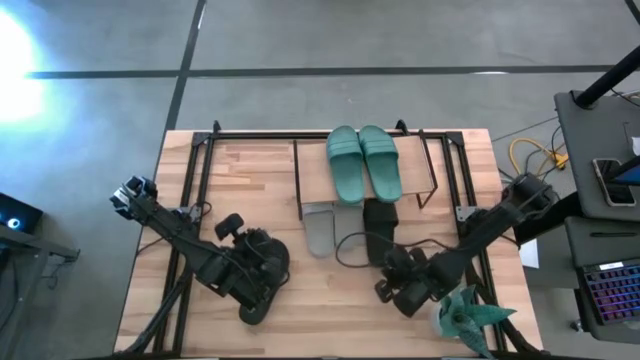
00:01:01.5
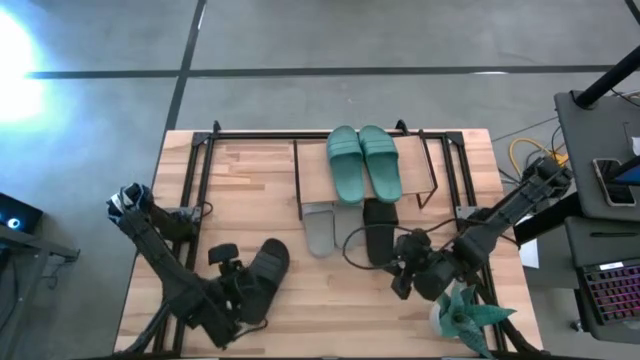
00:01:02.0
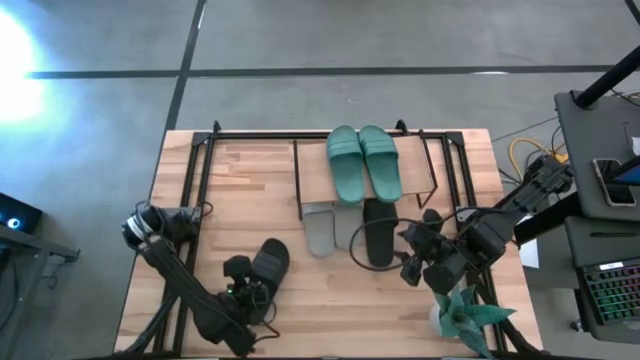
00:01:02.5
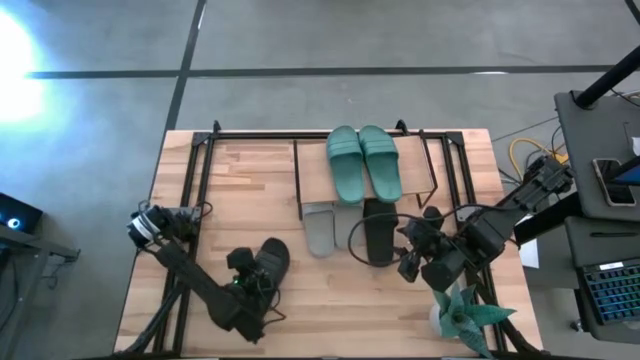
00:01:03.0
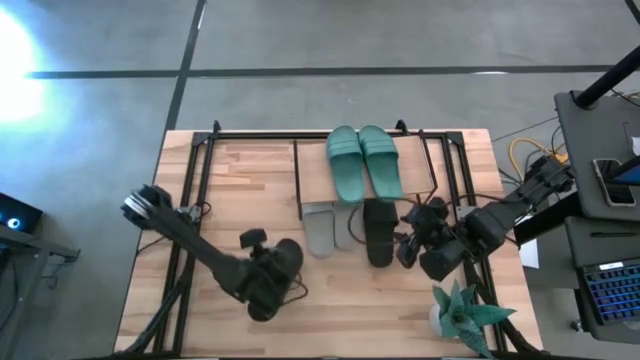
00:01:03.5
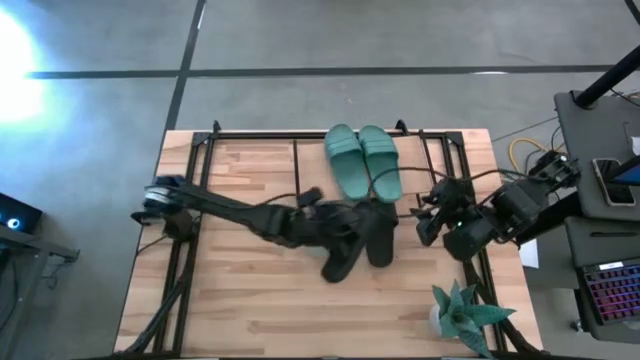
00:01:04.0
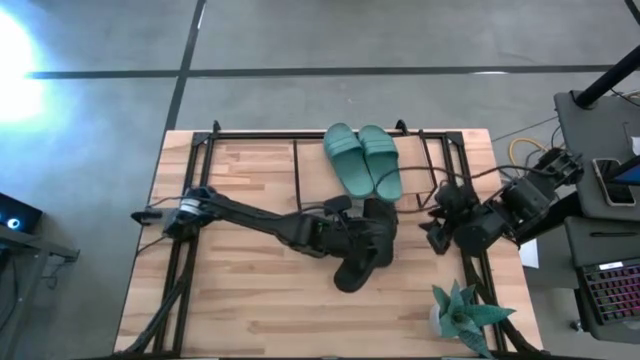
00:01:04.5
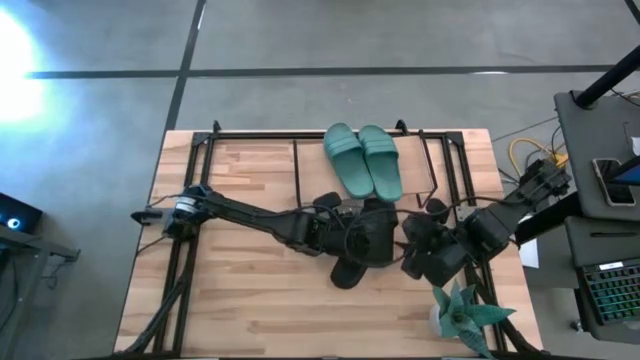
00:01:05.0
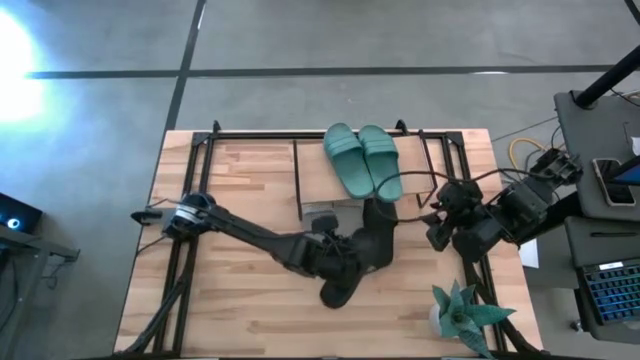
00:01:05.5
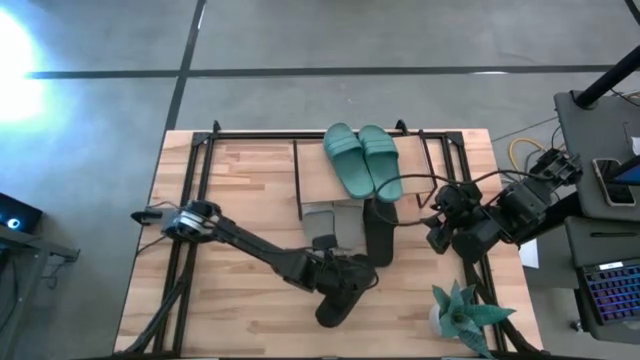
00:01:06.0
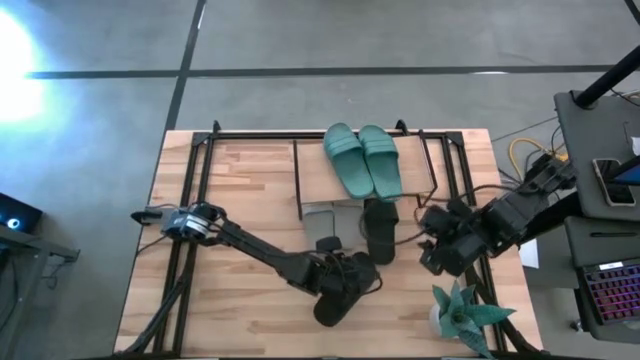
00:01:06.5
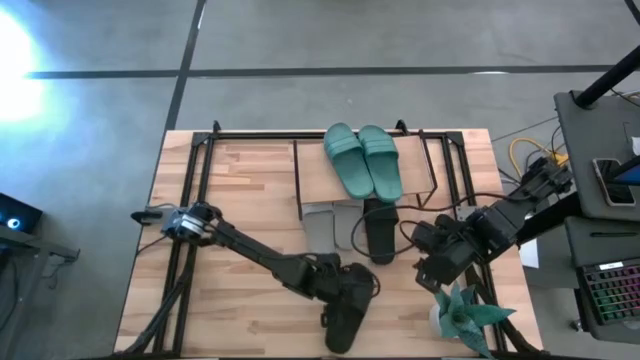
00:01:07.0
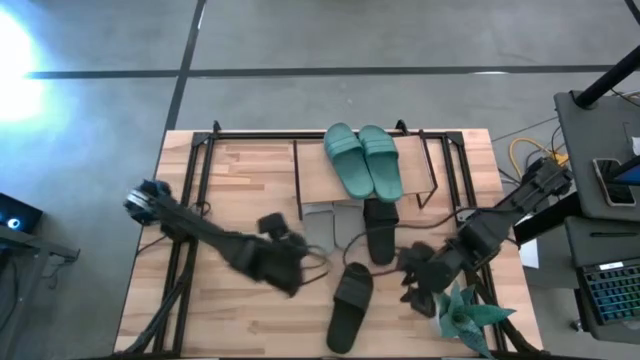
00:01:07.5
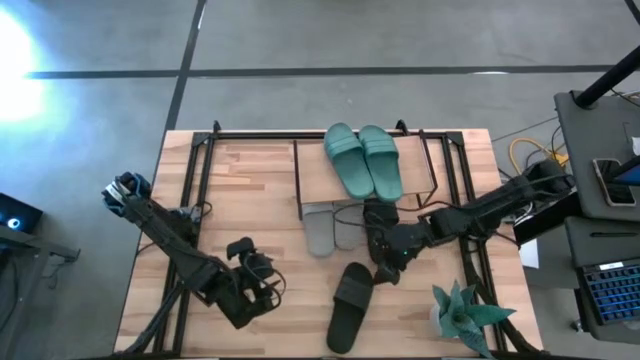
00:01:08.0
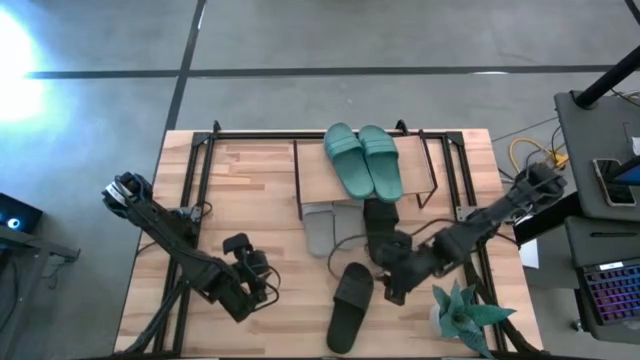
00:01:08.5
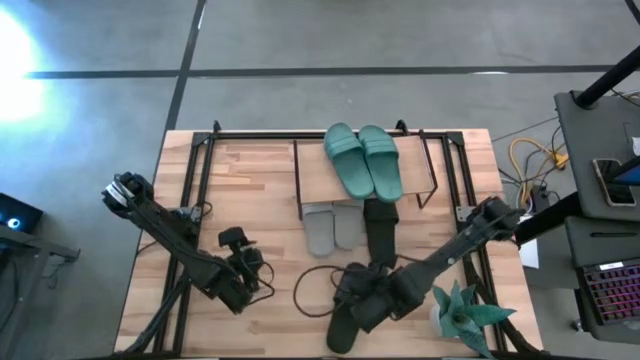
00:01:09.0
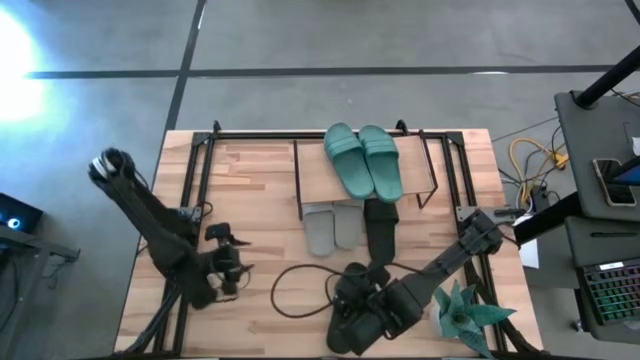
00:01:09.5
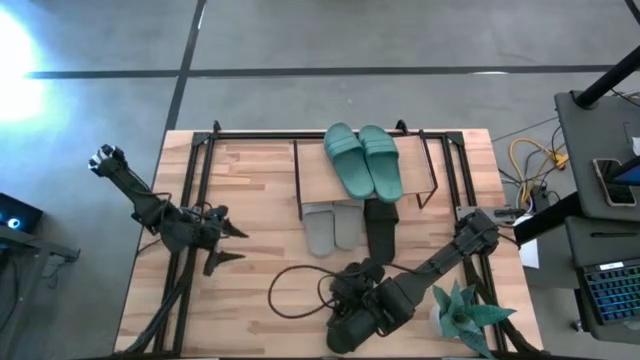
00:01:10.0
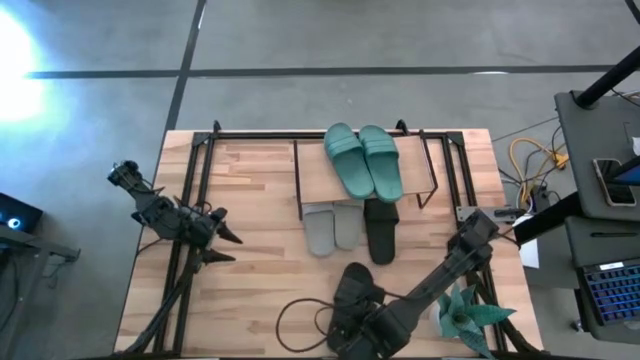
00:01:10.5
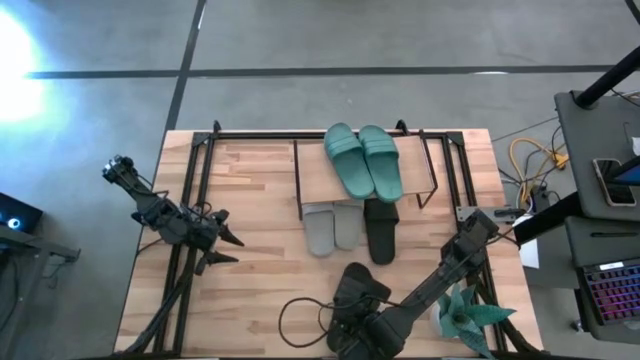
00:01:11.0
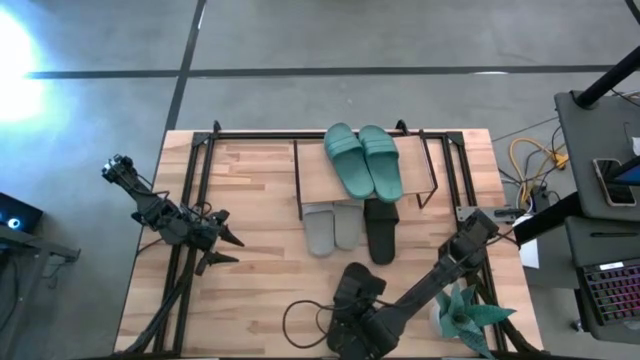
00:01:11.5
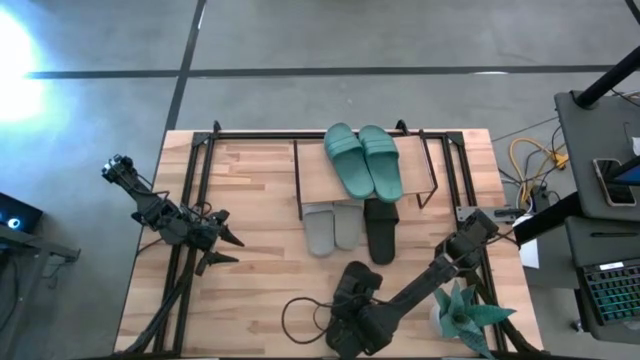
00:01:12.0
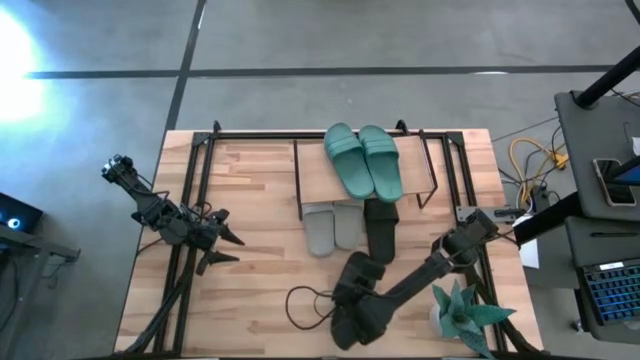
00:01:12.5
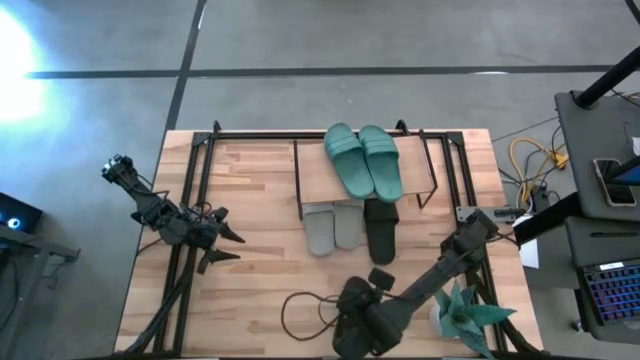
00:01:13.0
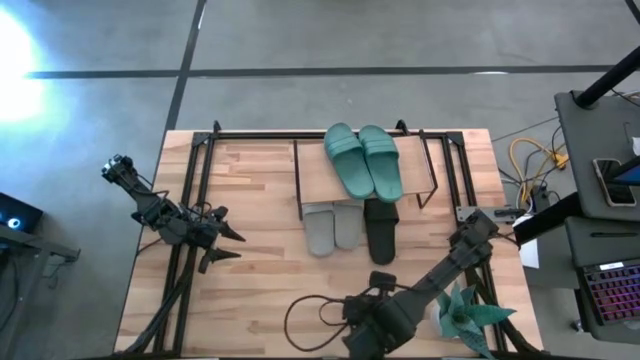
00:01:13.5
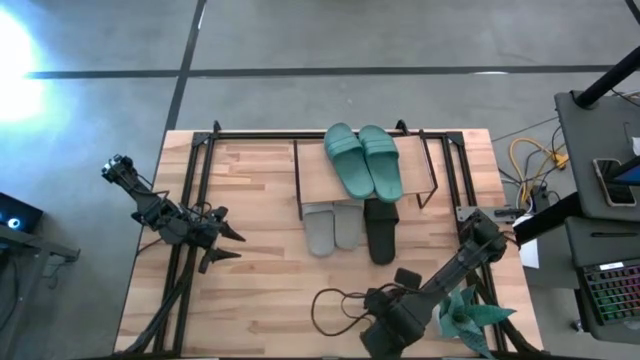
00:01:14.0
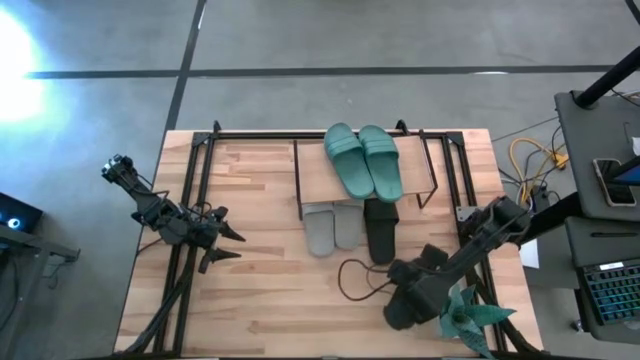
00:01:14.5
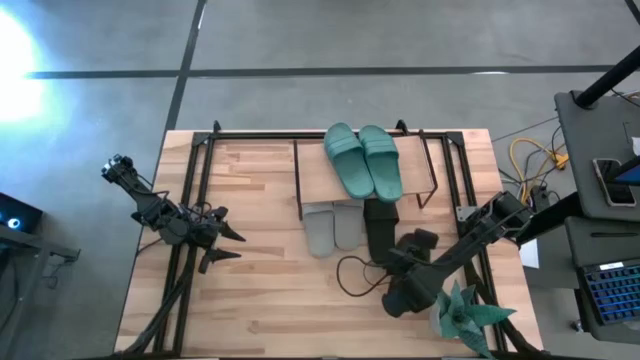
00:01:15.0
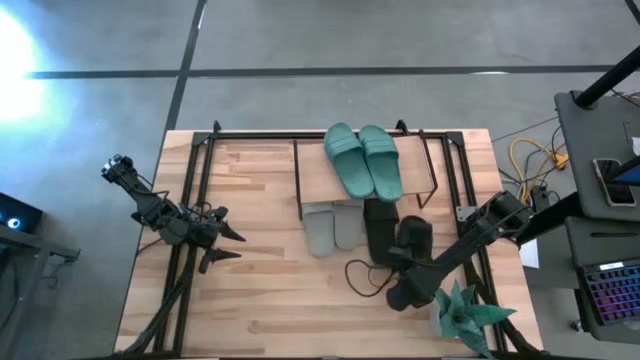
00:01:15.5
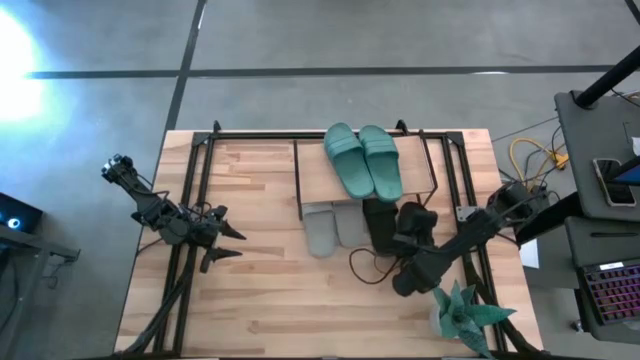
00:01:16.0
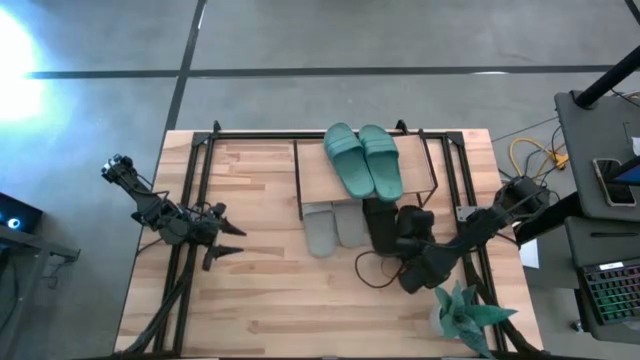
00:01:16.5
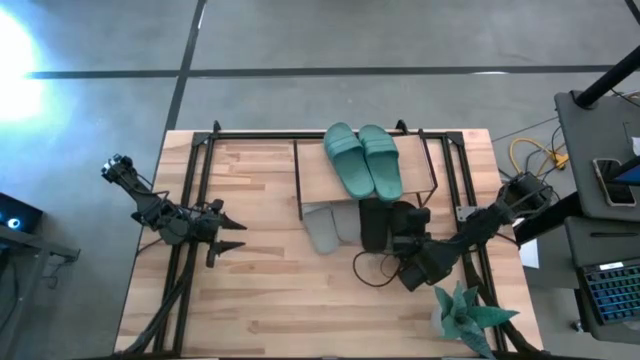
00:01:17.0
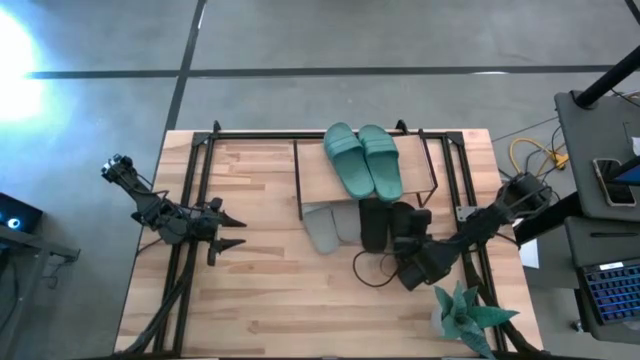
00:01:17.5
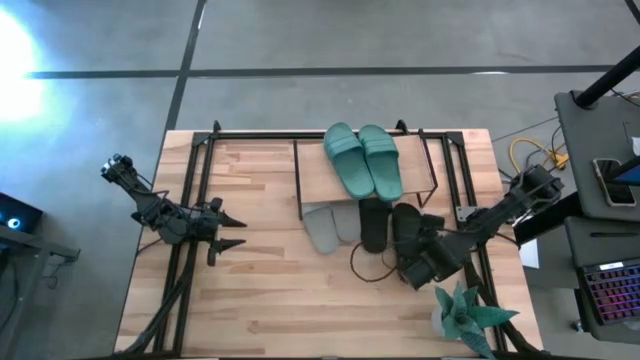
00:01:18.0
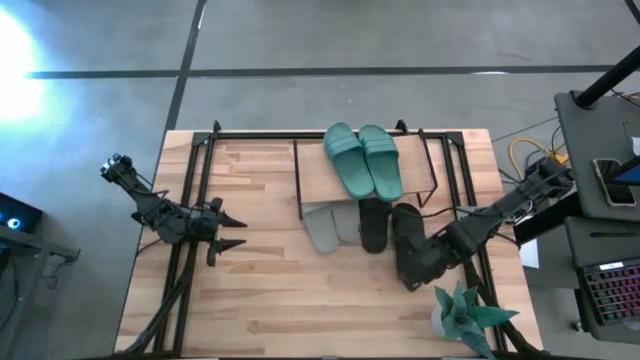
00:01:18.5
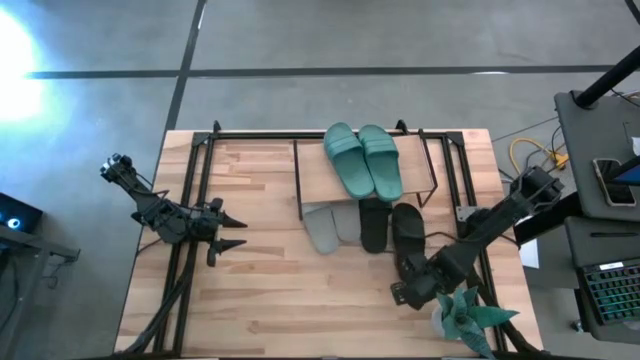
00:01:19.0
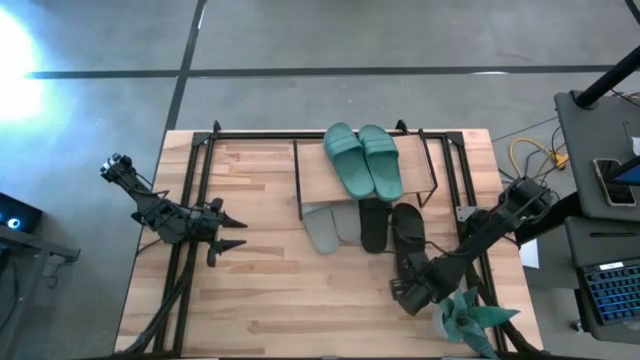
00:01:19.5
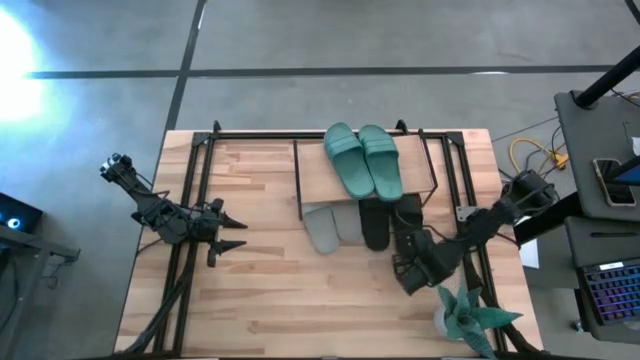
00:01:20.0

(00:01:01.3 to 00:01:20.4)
Task: Pick and place slides into the shelf
Put the black slide under the shelf

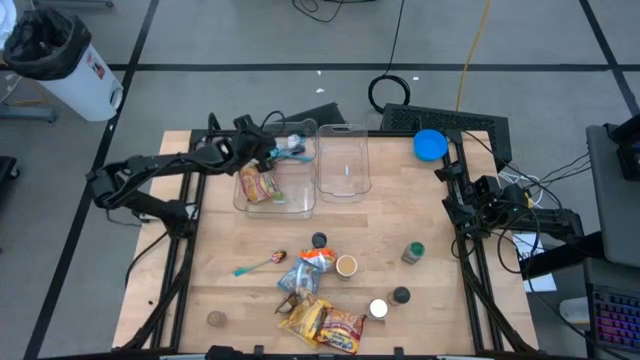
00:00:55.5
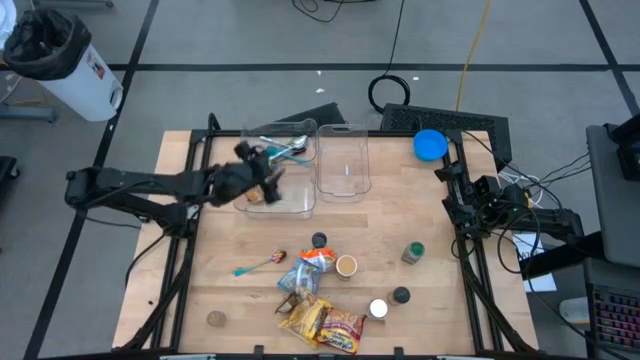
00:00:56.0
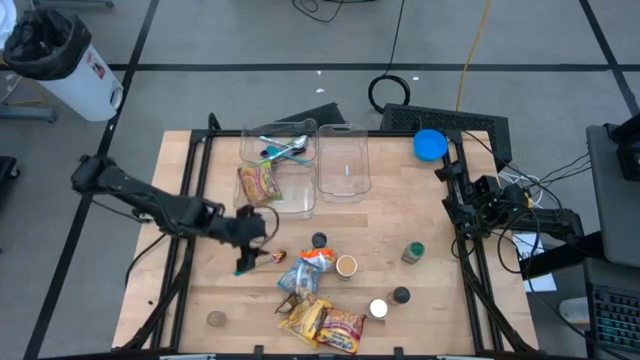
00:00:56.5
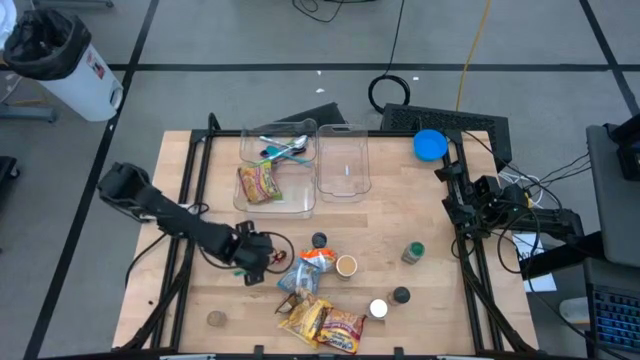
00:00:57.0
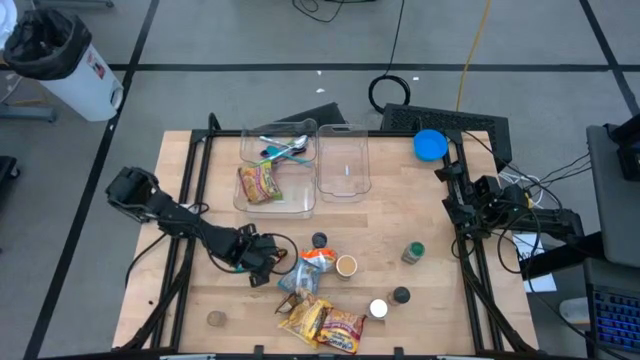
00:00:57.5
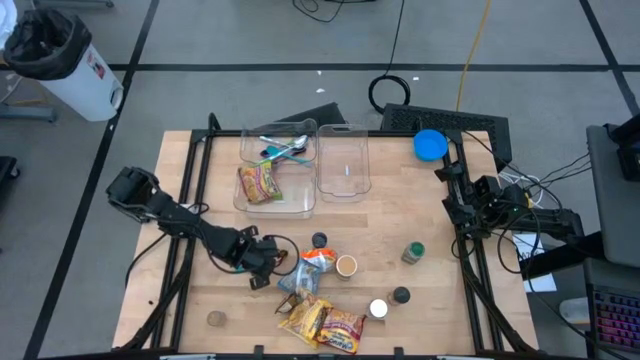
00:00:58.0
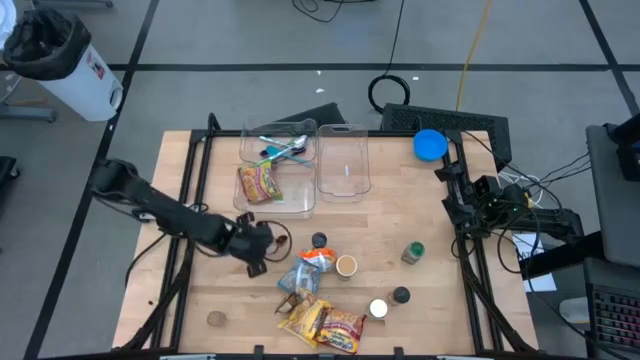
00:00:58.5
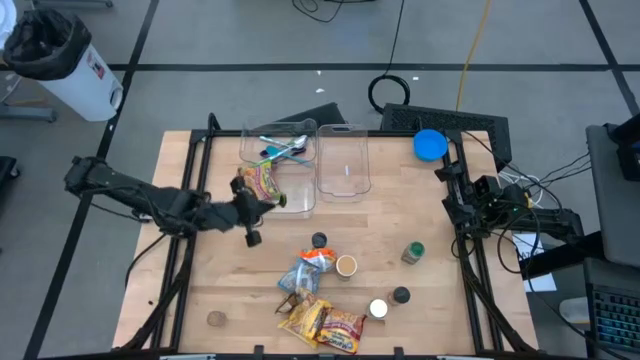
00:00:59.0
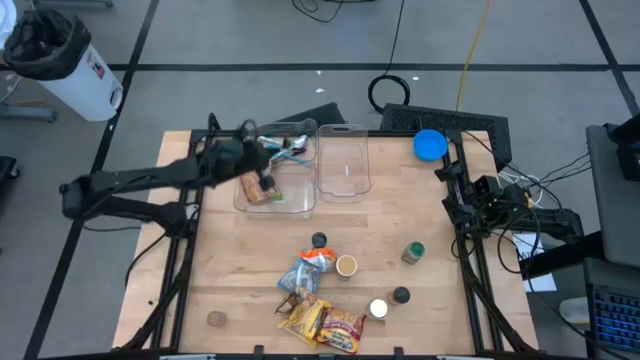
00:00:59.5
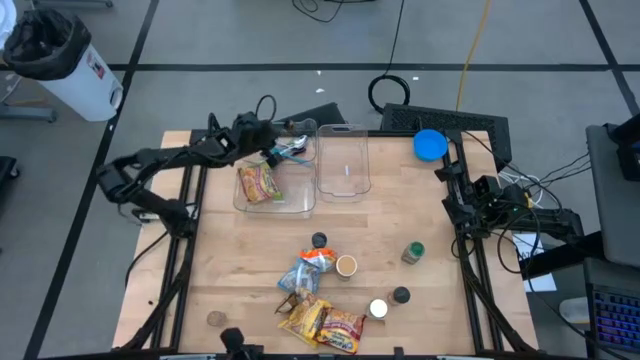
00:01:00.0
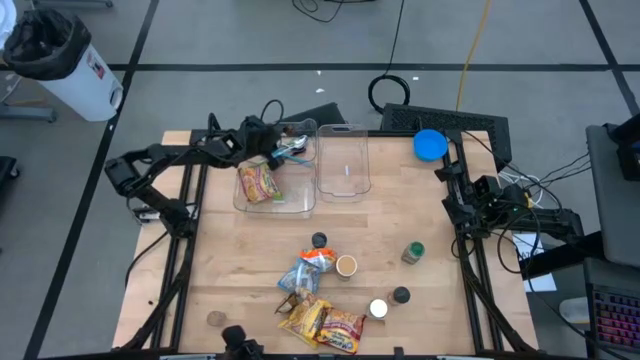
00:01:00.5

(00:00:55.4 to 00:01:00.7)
Task: Pick & Place Food Item
Put the blue spoon into the top left transparent bin
